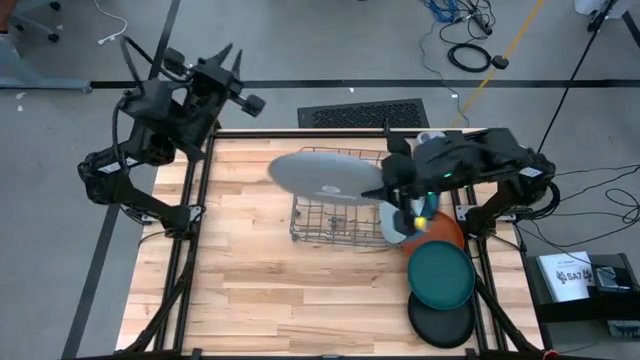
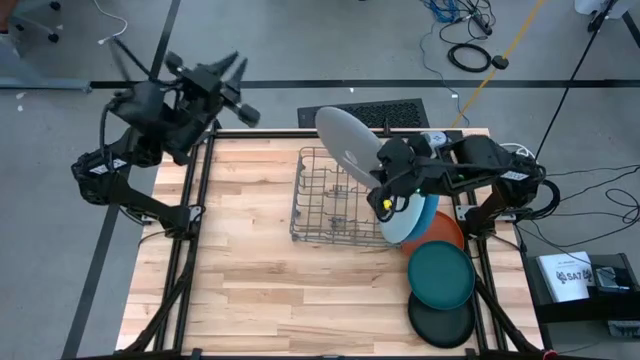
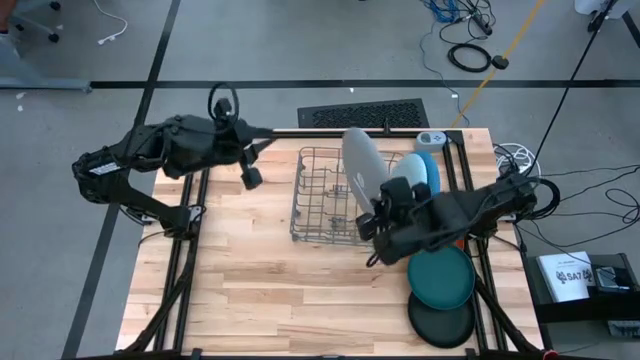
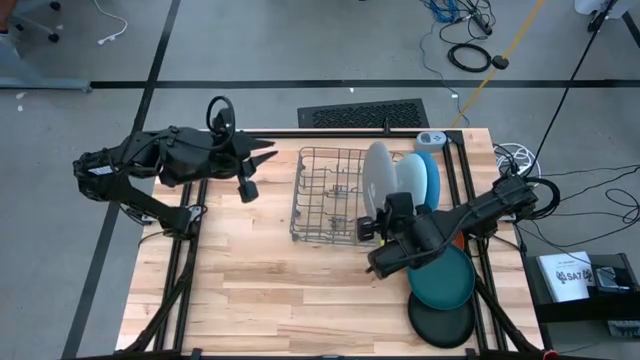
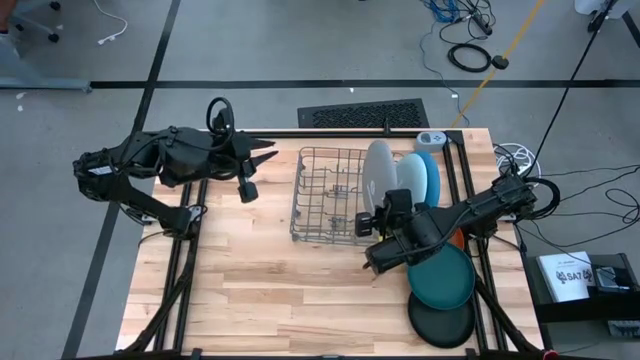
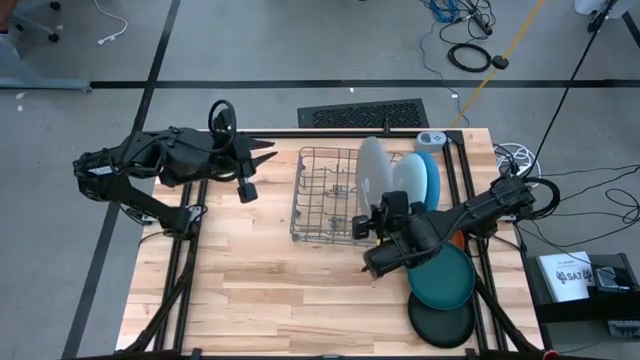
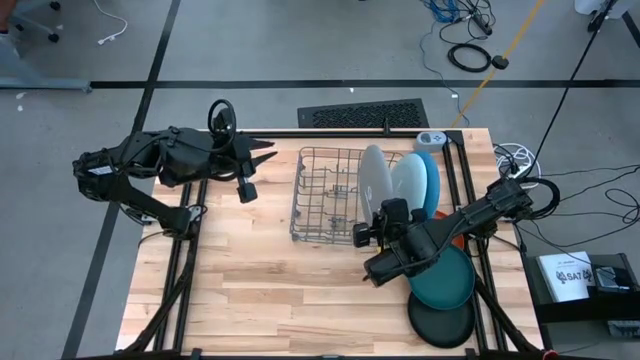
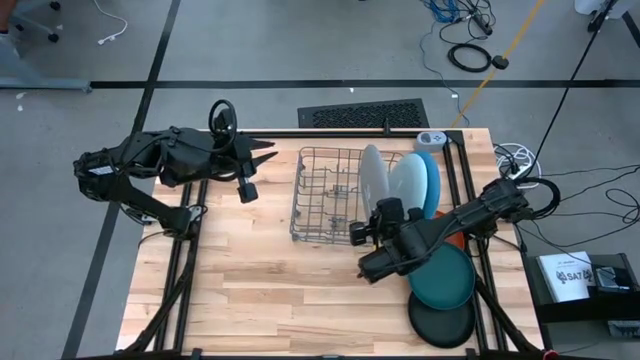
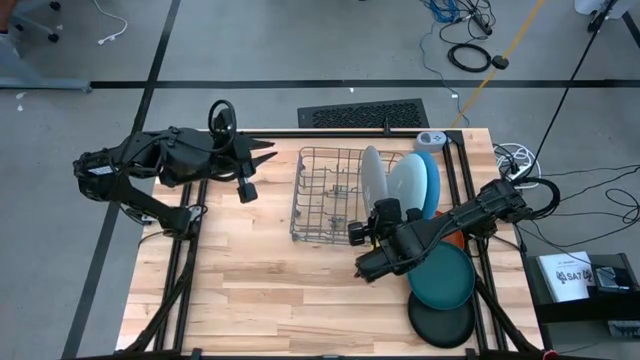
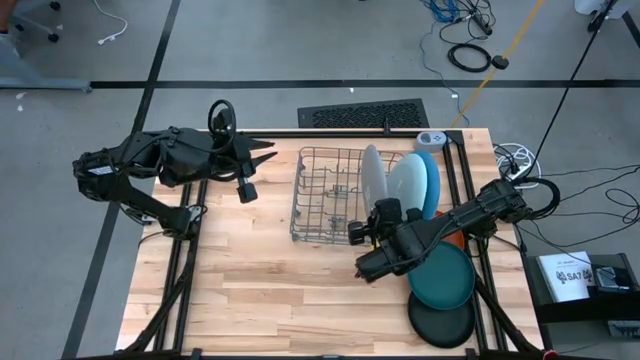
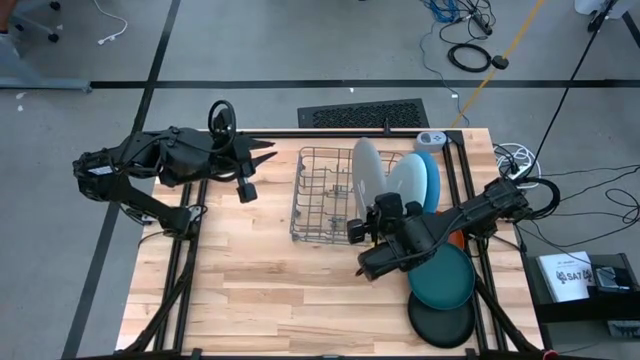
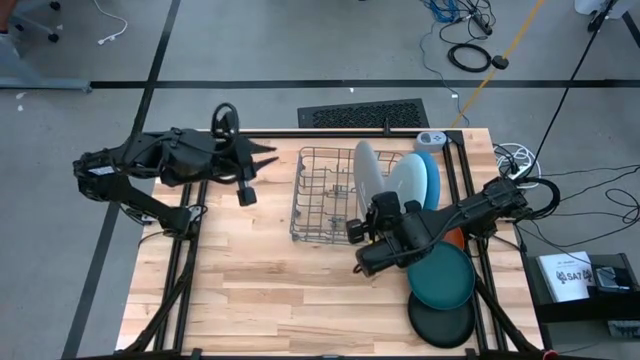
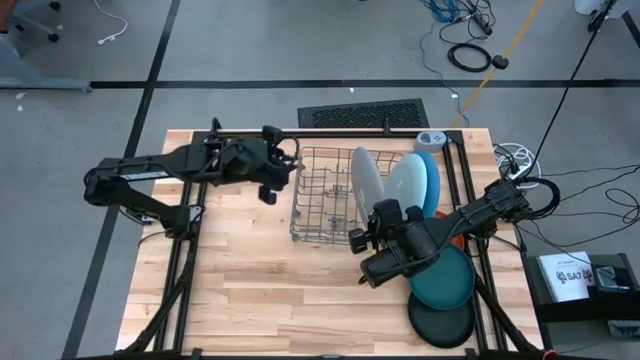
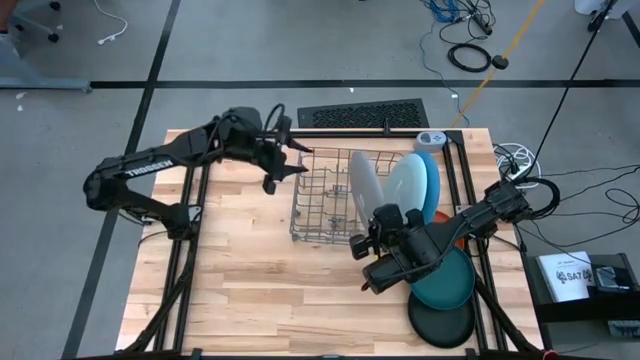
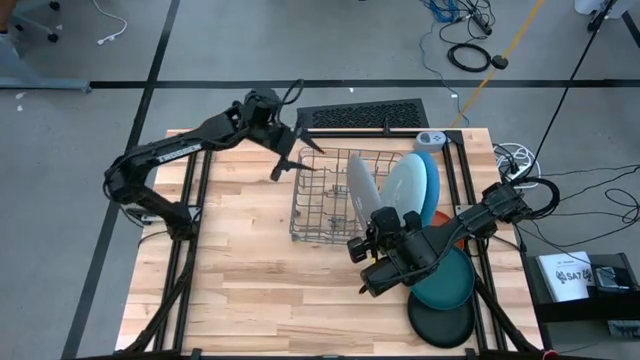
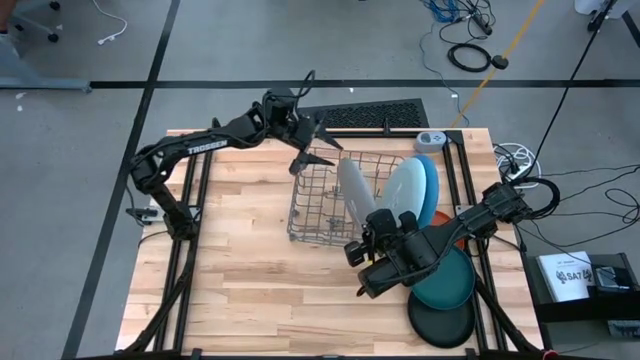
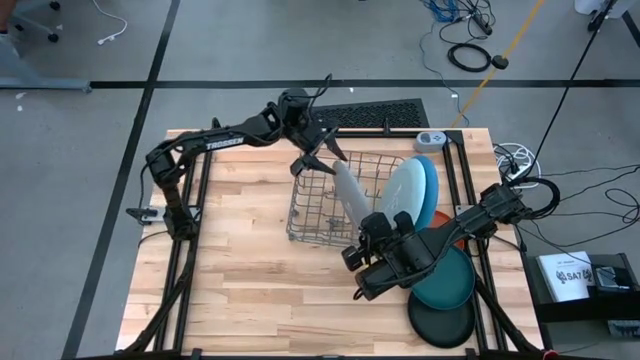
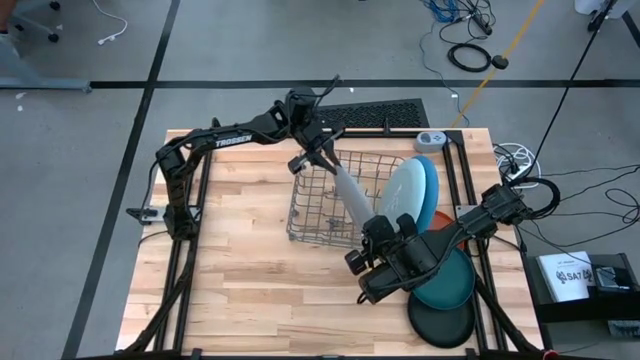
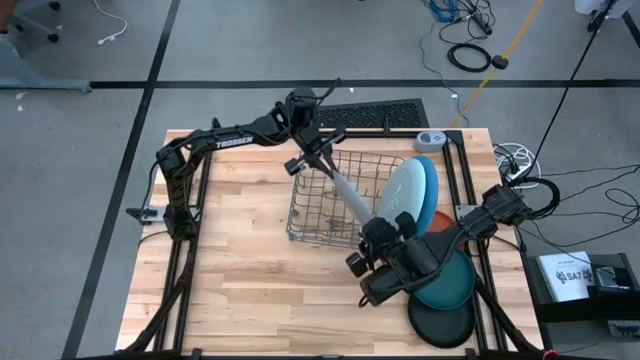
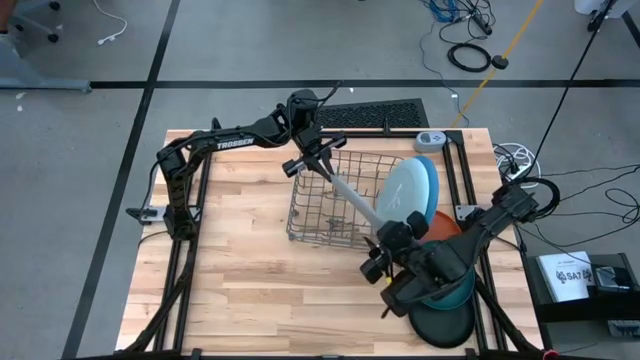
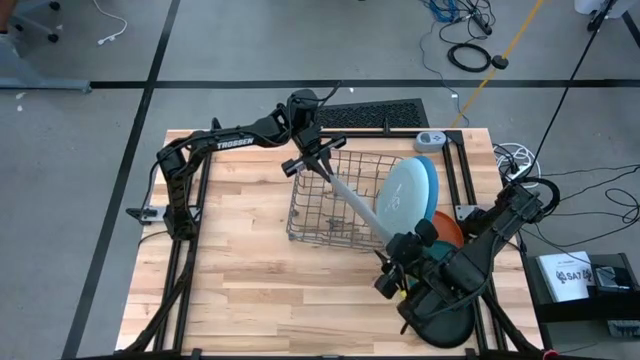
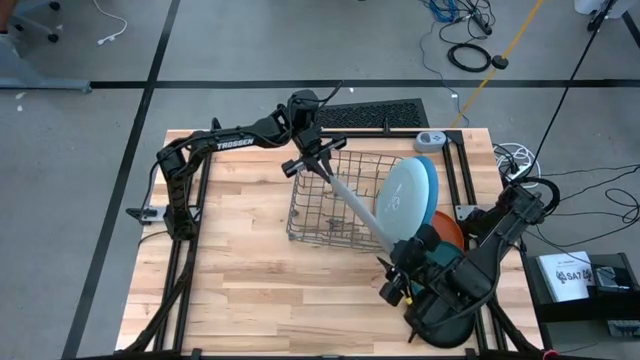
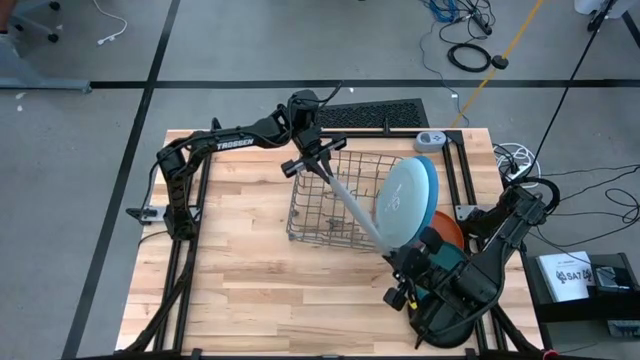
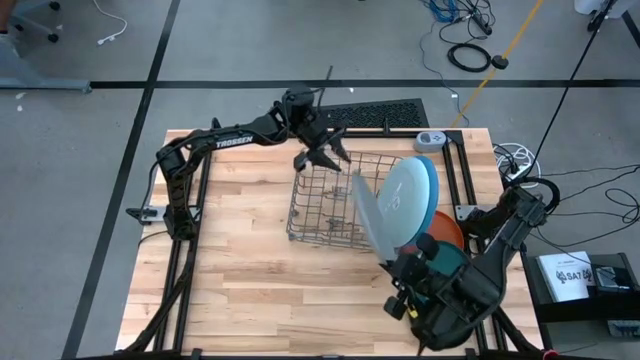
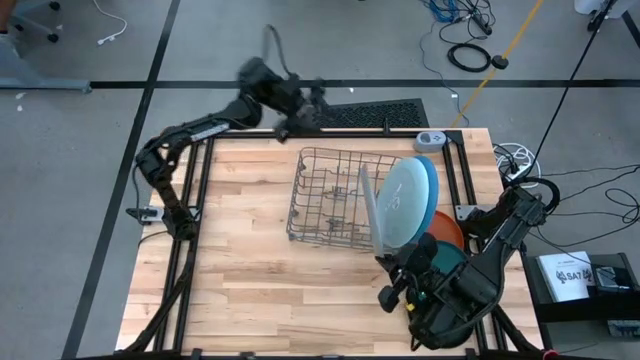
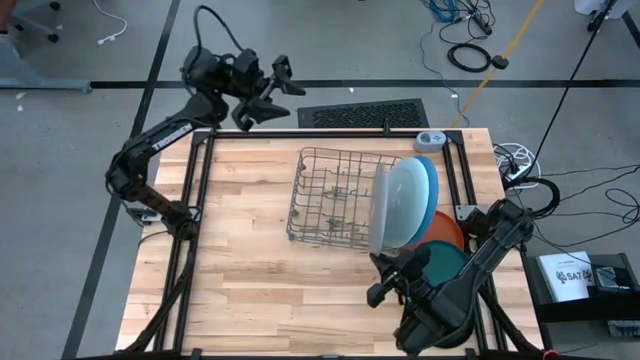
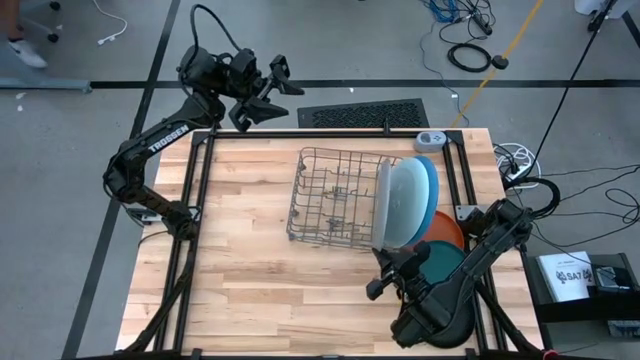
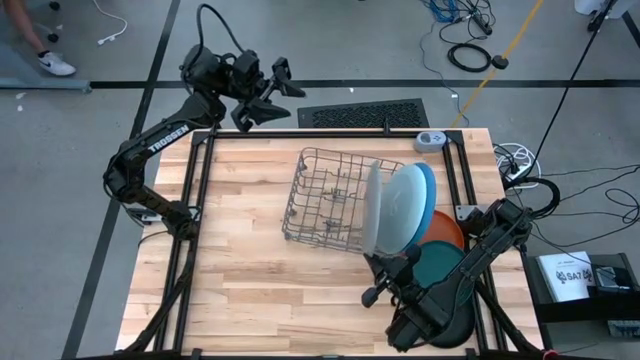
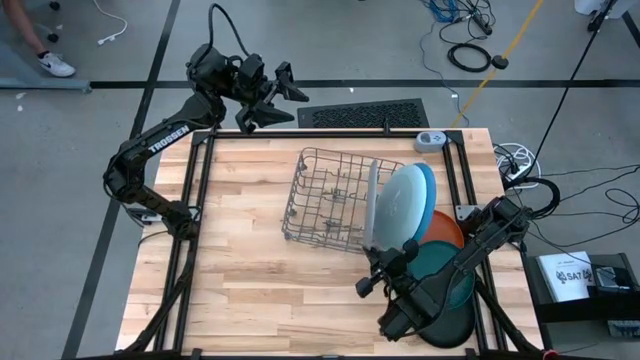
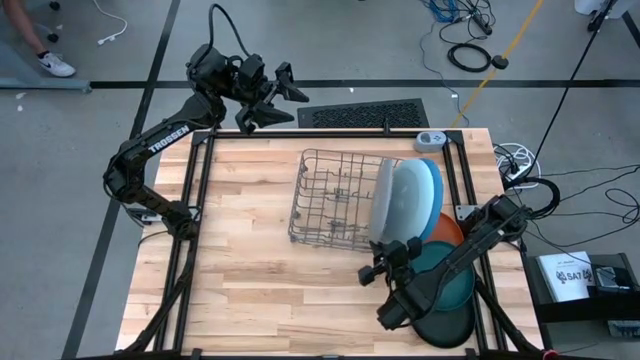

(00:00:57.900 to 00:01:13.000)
Task: Sort dishes
Put the gray plate into the dish rack

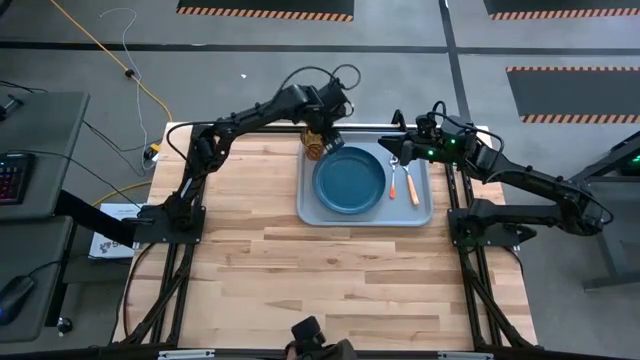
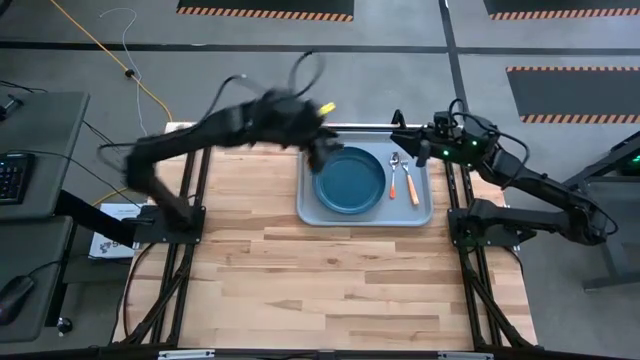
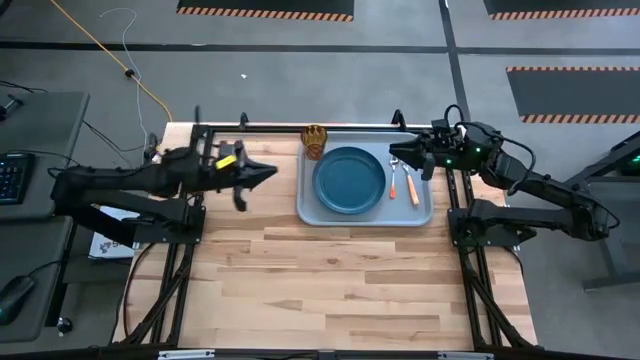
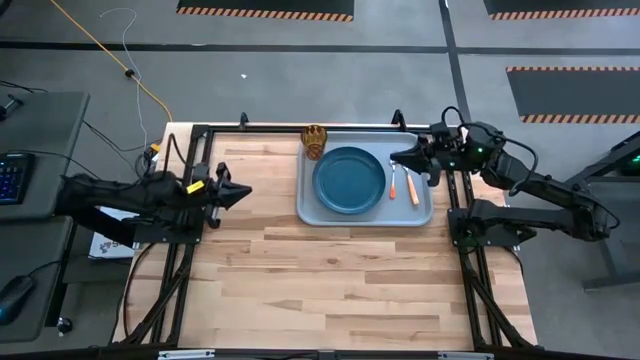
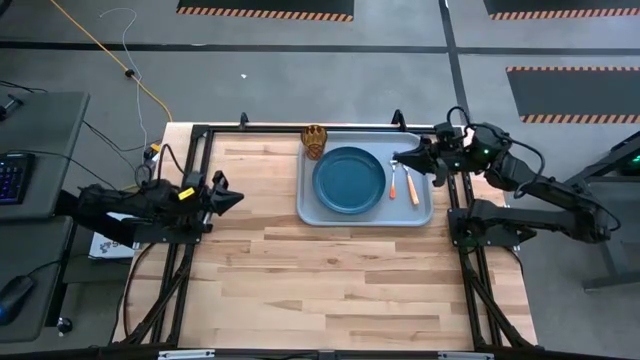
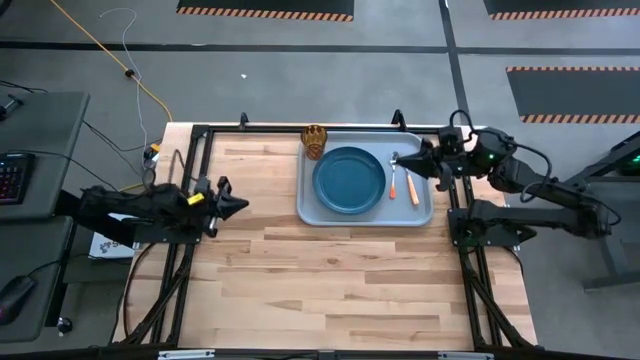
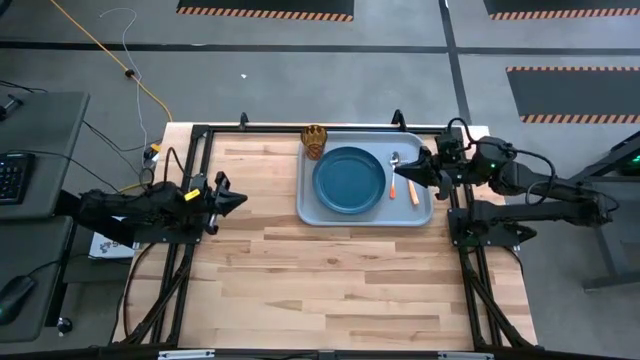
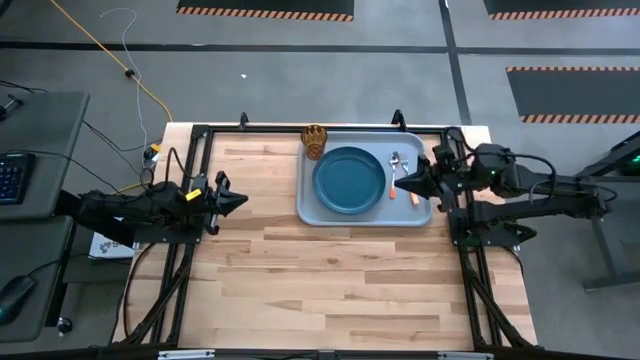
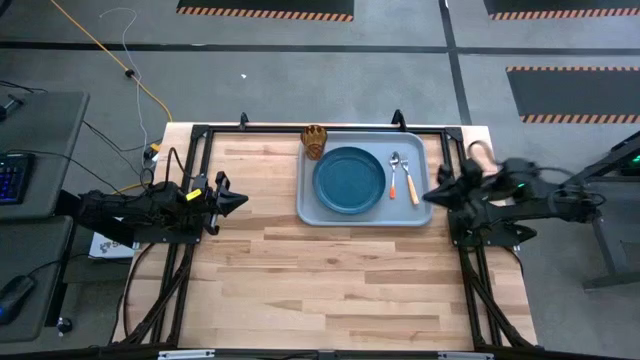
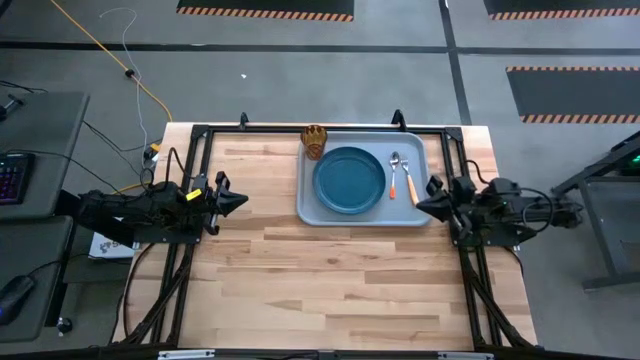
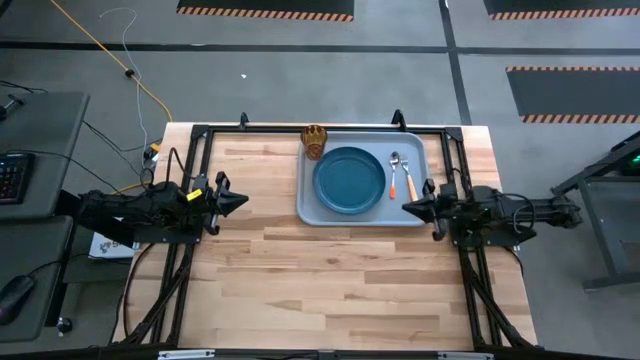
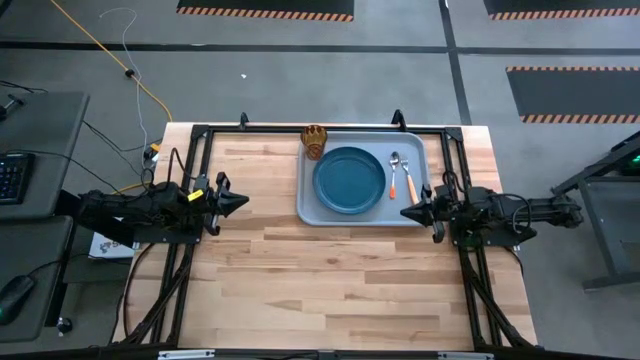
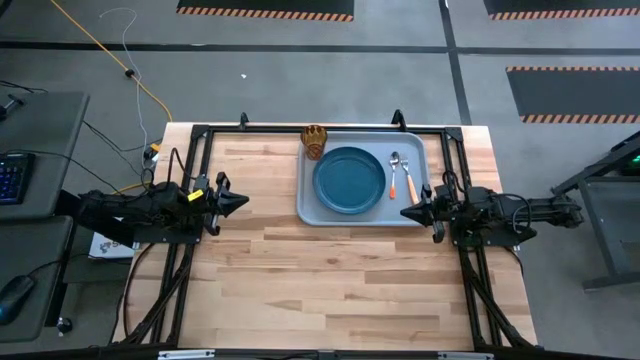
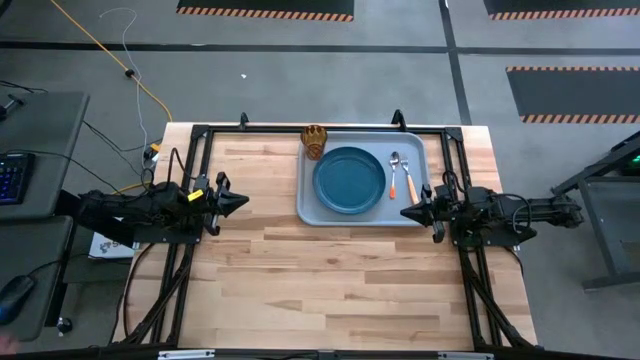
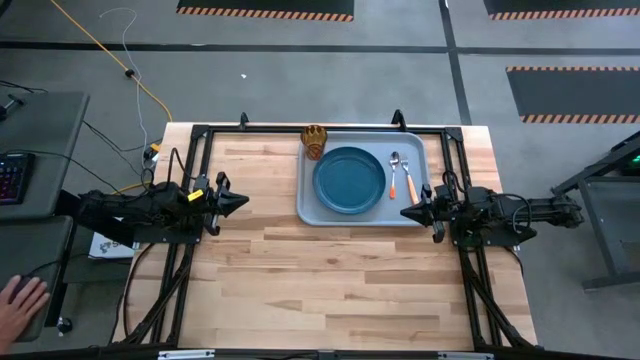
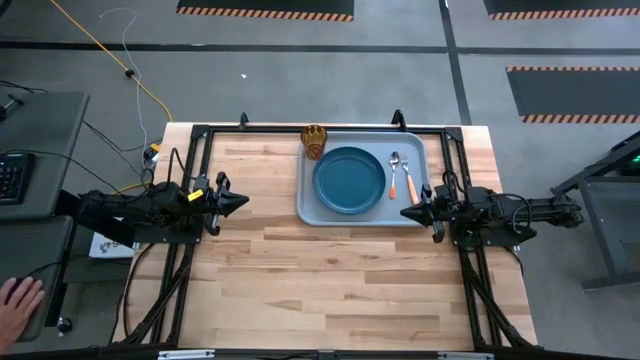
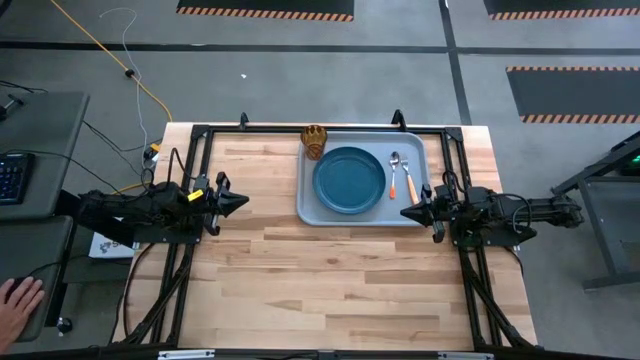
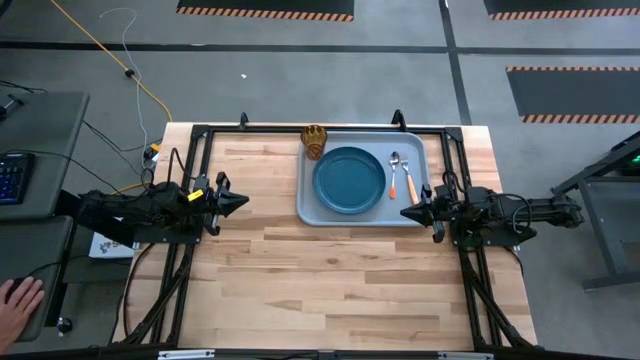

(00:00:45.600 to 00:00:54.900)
Task: Pick and place plate/cup/fork/spoon on tray
Return to Home Position
